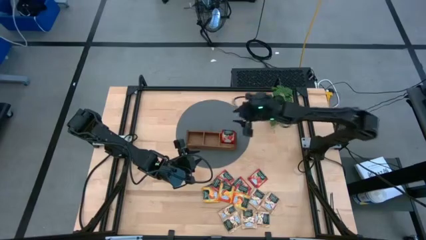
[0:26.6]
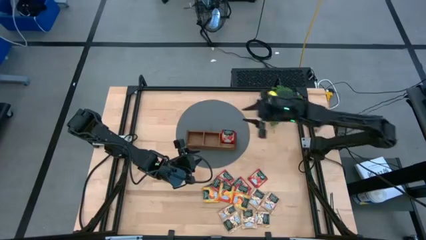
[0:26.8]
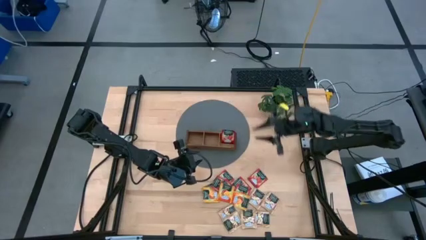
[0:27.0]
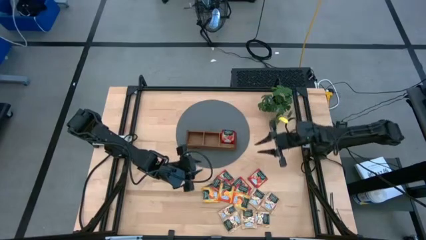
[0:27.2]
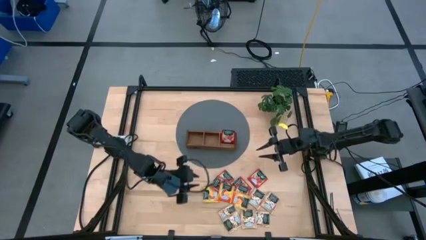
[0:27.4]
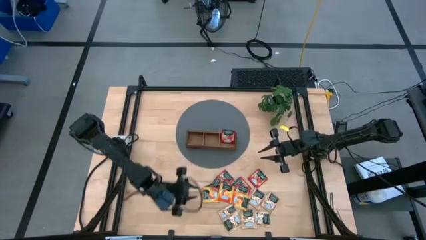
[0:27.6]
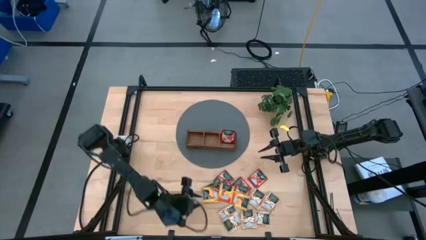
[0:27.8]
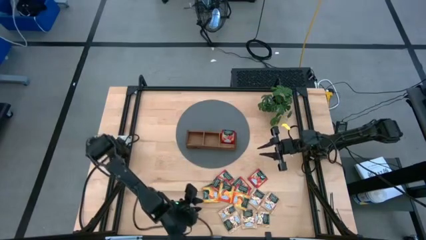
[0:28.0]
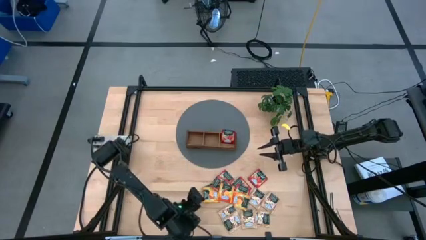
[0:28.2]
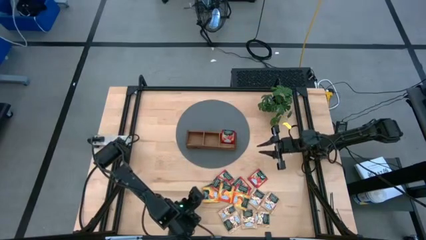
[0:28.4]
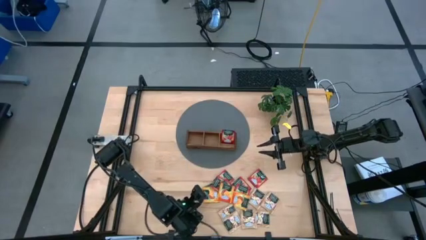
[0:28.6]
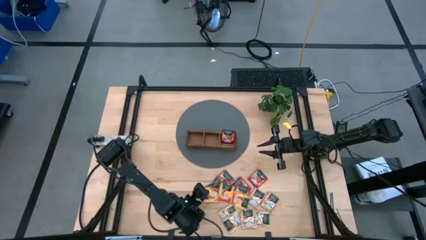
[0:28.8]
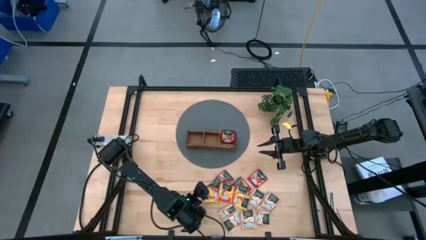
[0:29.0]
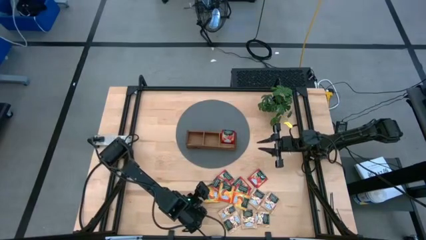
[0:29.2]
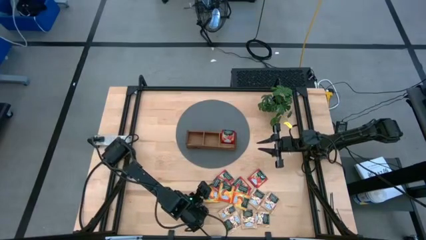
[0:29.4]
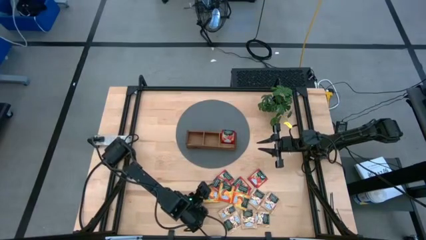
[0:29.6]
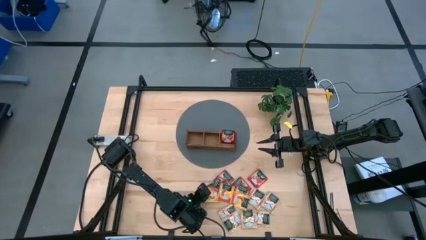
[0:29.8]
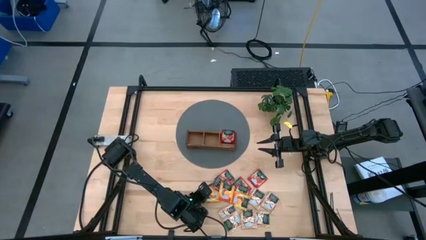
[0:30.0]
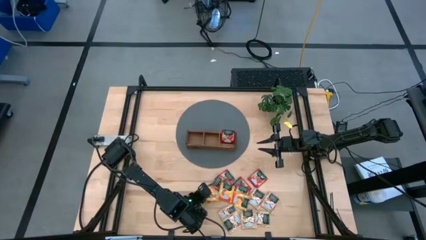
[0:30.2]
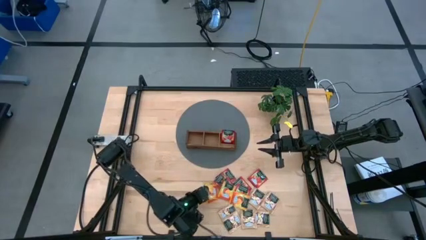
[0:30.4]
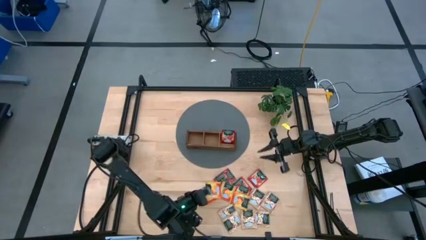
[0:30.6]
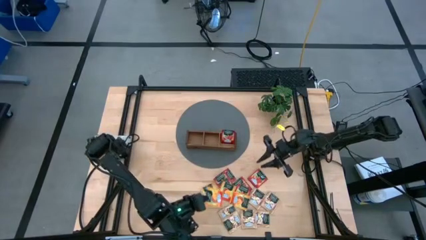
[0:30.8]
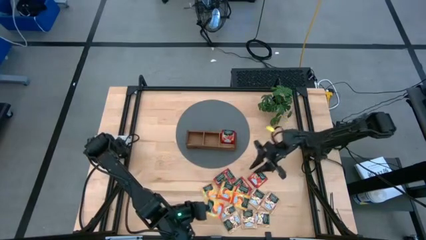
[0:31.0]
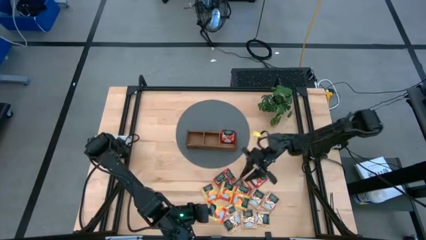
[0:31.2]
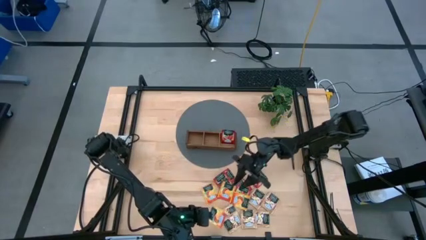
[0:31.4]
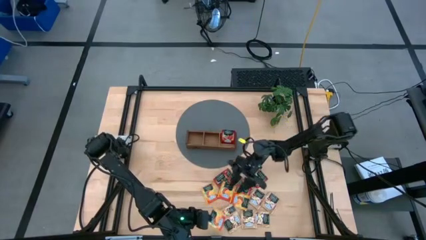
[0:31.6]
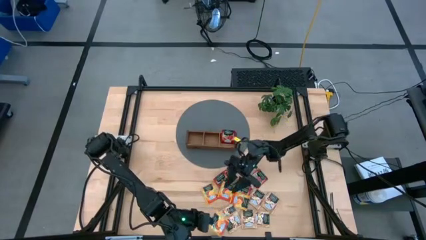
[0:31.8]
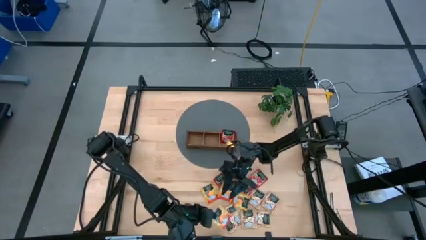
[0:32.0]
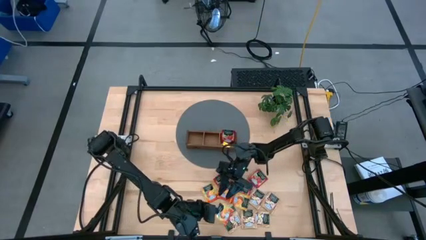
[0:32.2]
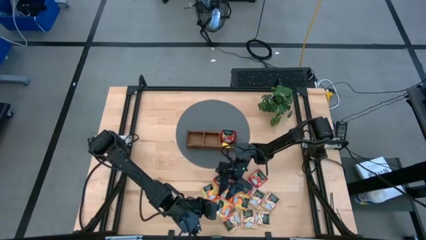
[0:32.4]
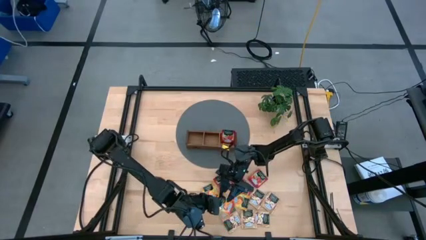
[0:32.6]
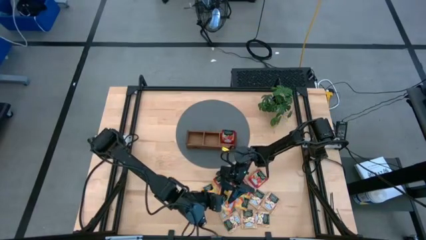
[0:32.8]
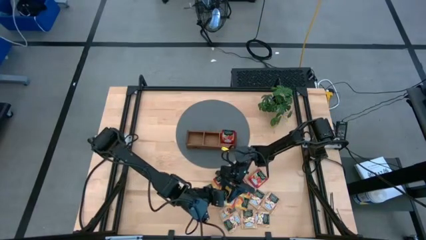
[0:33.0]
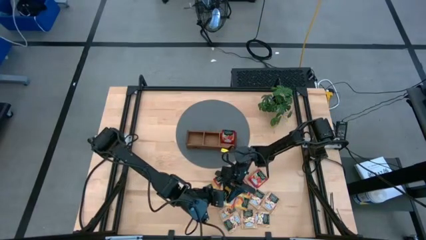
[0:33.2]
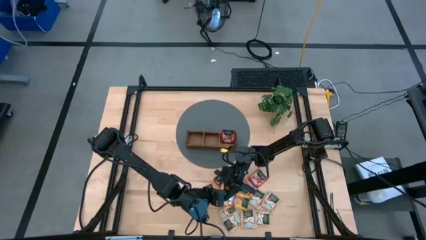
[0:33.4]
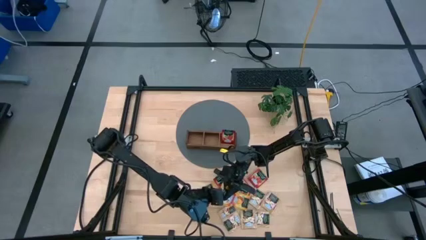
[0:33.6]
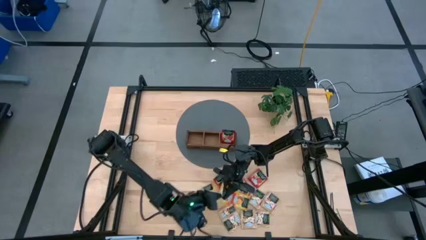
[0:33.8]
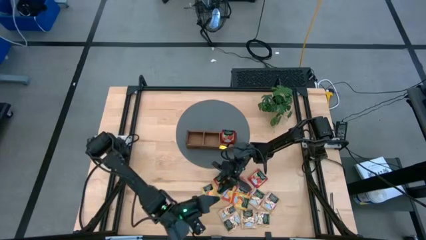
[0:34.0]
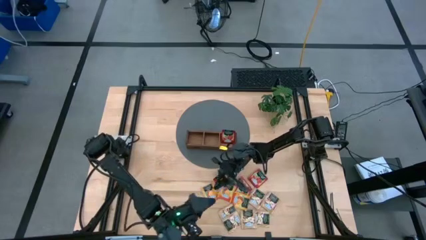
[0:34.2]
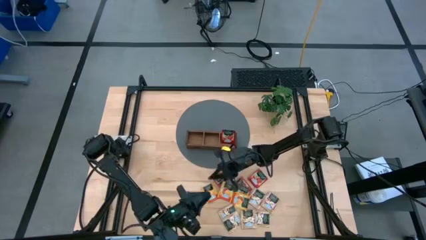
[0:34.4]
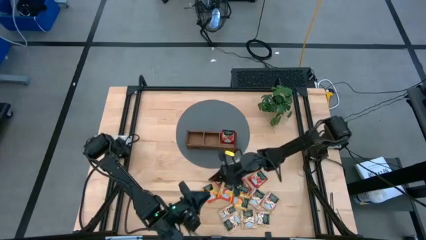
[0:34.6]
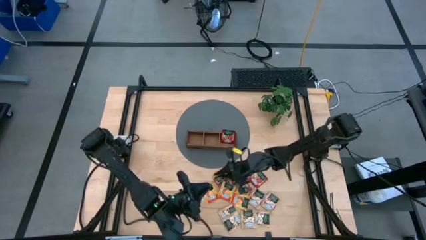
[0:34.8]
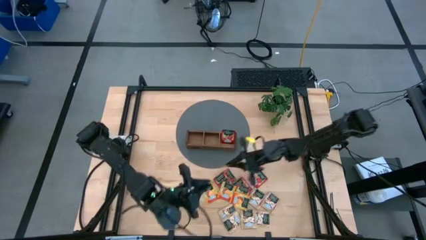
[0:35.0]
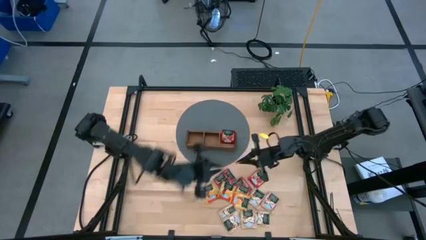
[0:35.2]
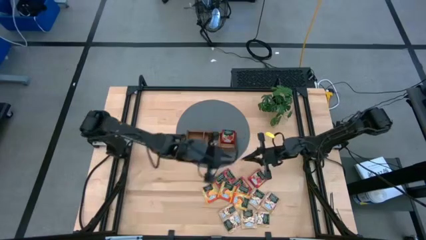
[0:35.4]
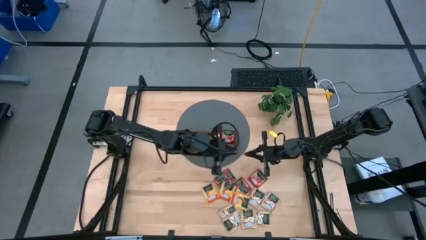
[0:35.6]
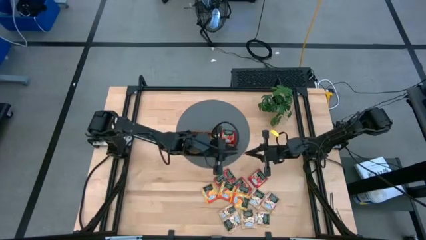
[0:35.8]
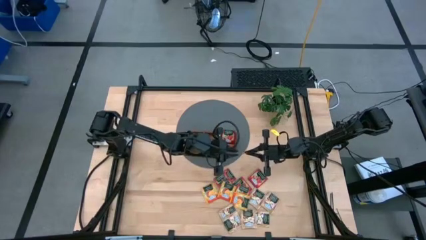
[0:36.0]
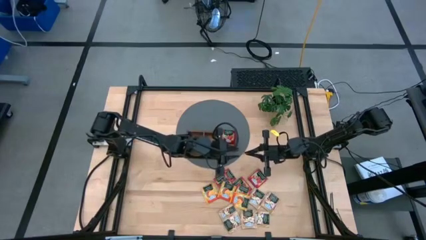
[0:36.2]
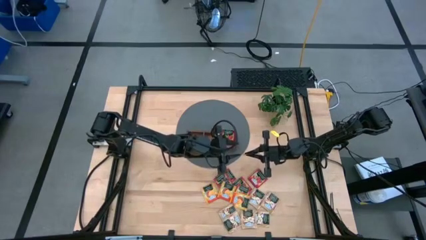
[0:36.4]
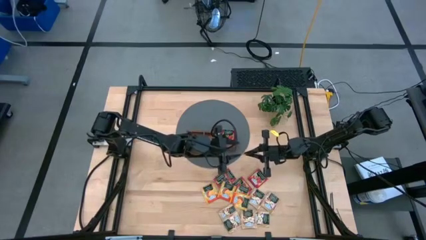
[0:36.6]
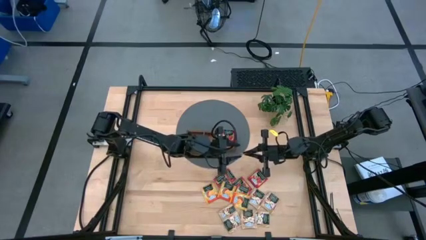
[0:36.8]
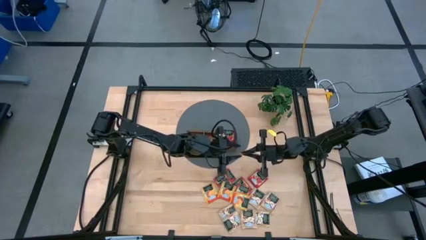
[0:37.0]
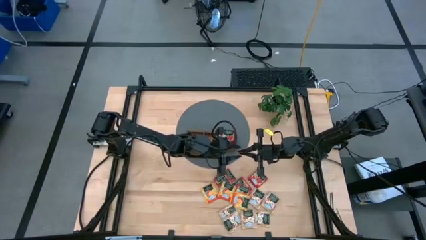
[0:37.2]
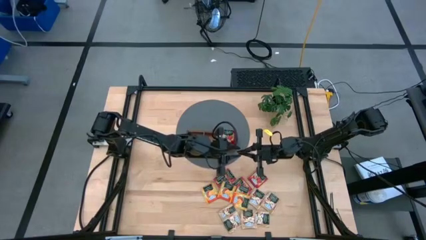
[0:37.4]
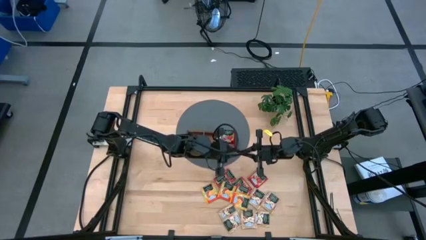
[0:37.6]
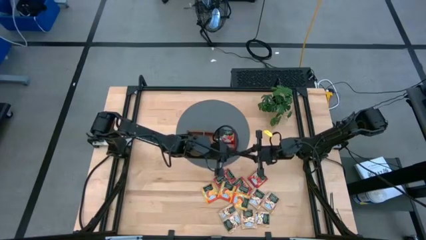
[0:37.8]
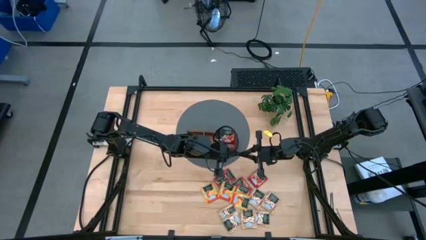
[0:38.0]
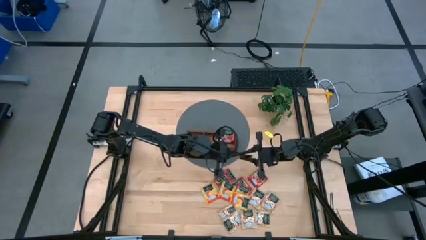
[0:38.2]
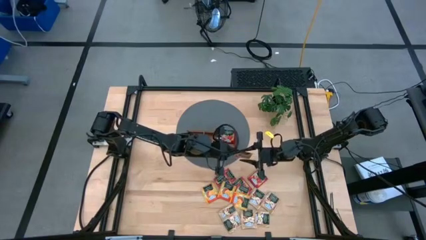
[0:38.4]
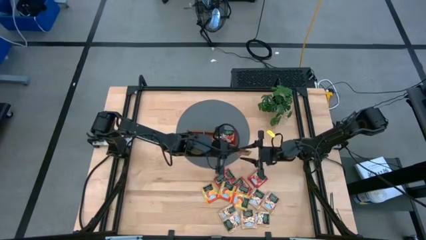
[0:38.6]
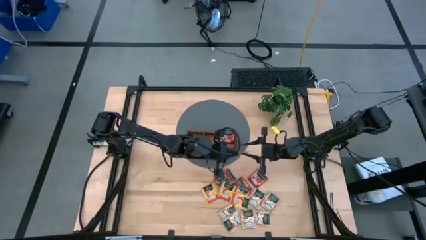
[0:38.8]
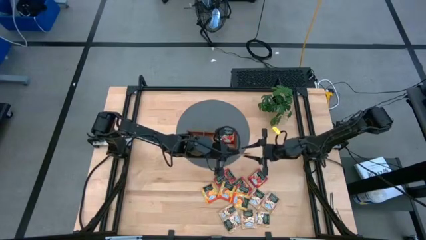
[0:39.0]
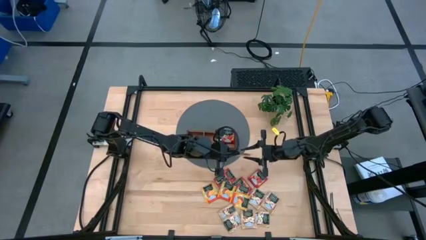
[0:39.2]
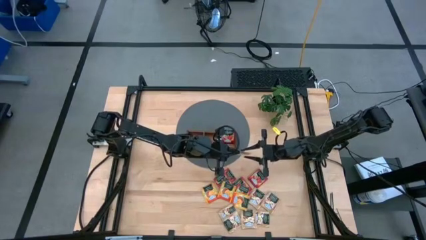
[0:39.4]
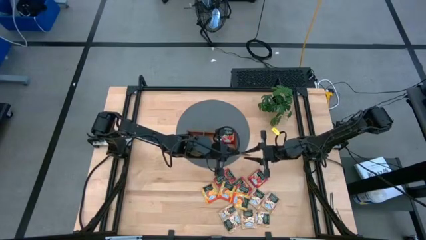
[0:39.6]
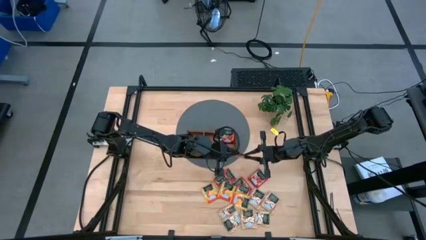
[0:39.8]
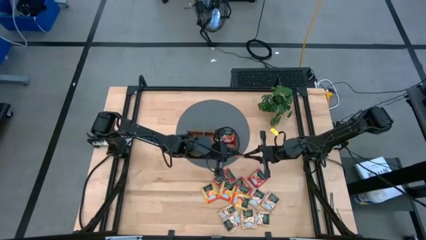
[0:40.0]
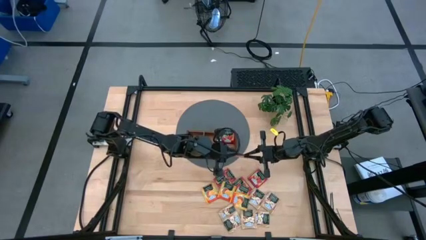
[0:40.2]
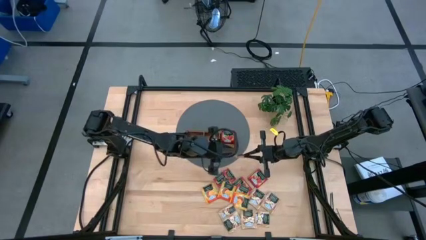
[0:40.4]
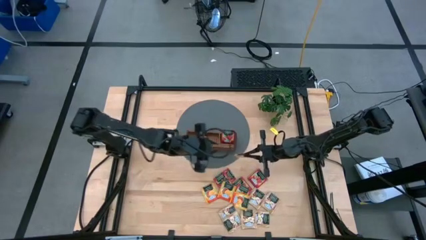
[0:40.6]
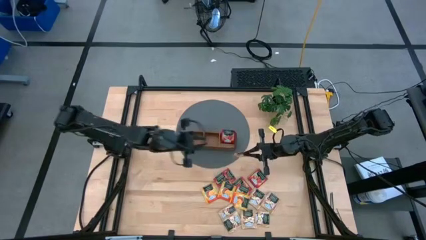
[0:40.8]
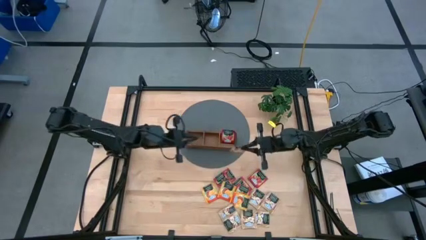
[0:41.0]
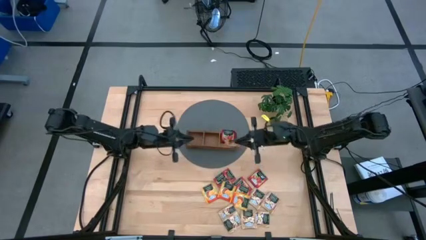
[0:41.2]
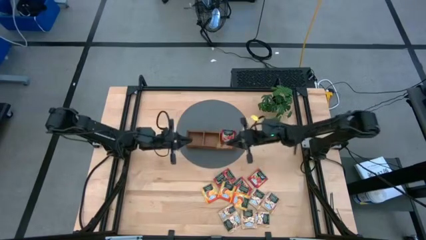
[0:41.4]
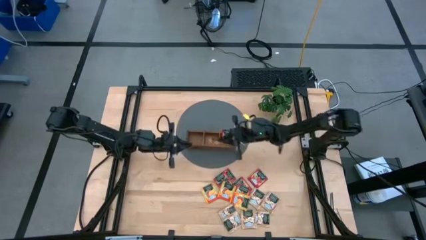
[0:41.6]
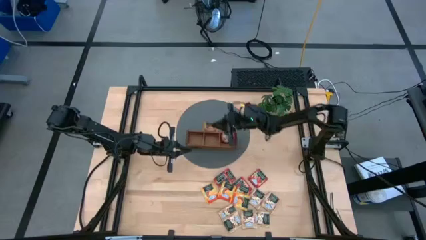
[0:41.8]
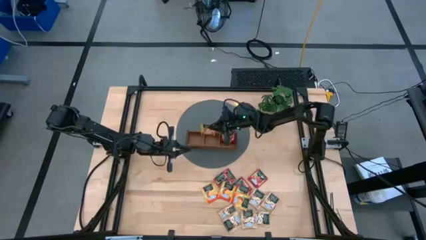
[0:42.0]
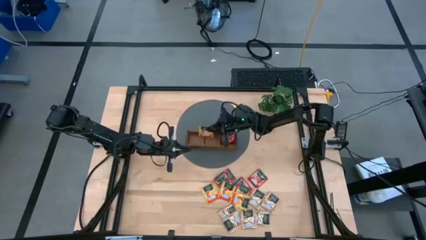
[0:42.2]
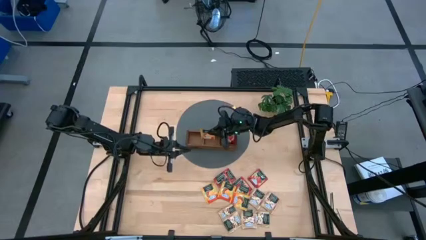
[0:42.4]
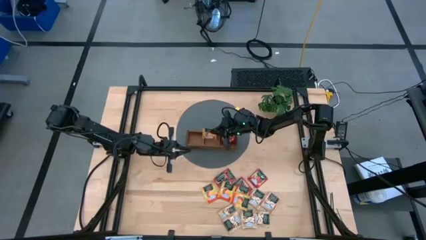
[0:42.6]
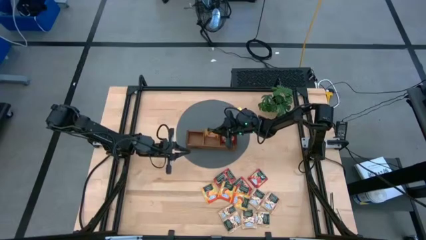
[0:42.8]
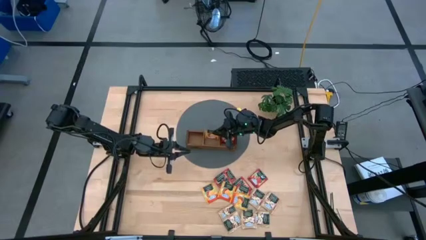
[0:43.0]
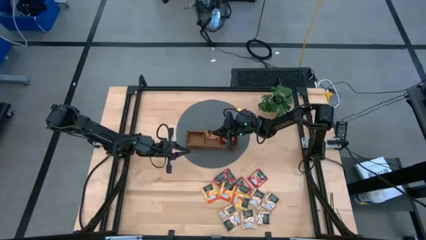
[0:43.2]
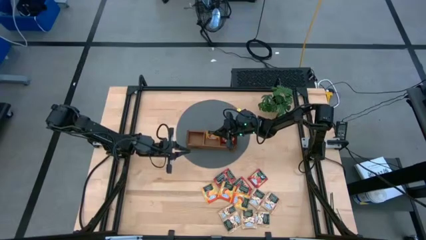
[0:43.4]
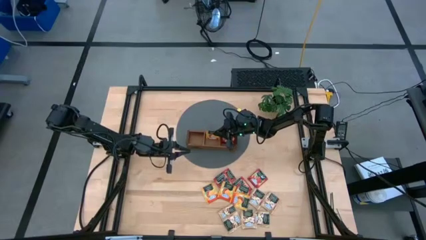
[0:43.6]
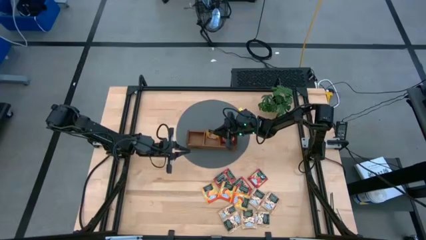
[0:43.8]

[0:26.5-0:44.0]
Task: Pick & Place Tea
Put the yellow tea bag into the middle section of the wooden organizer
